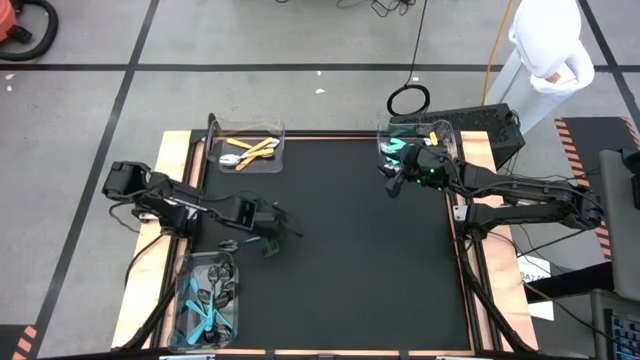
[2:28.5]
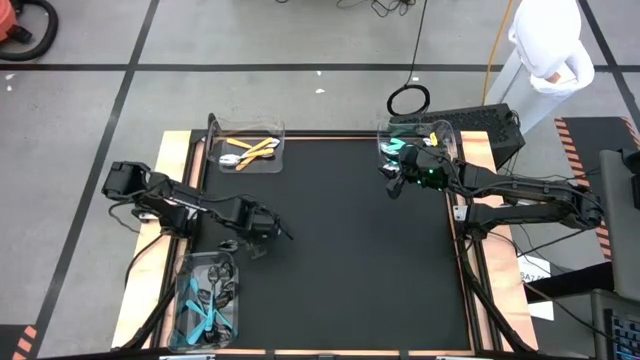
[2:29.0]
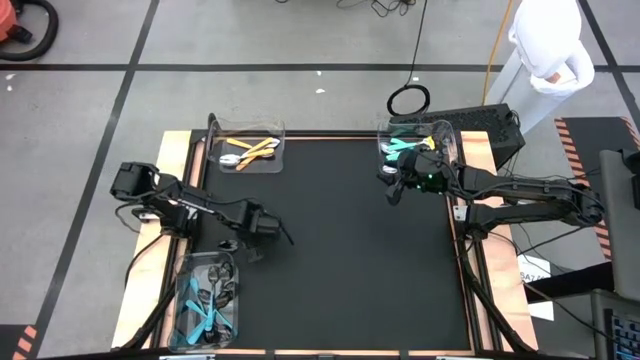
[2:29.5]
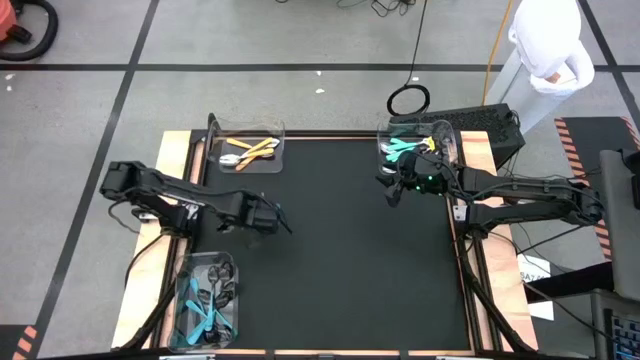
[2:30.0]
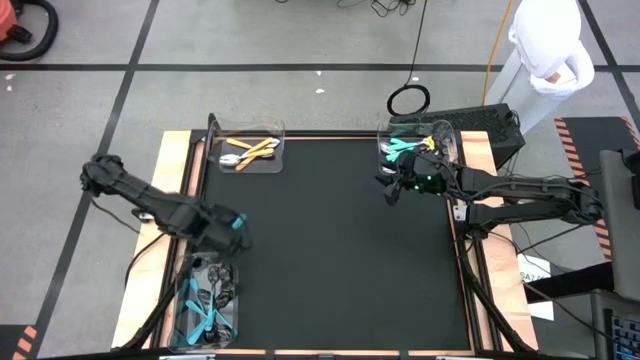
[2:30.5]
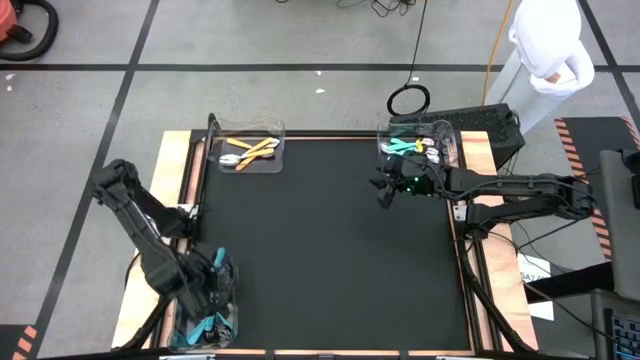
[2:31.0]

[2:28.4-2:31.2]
Task: Sort silverware by color (type)
Put the blue spoon into the bottom bin

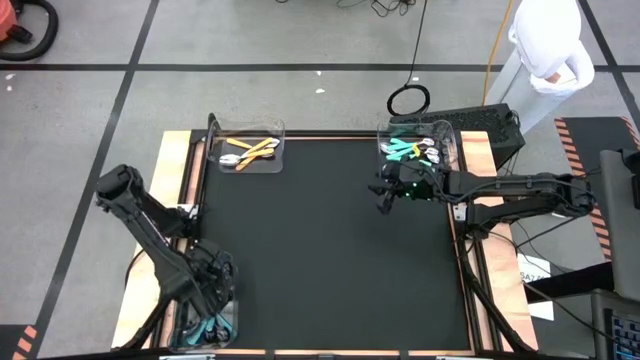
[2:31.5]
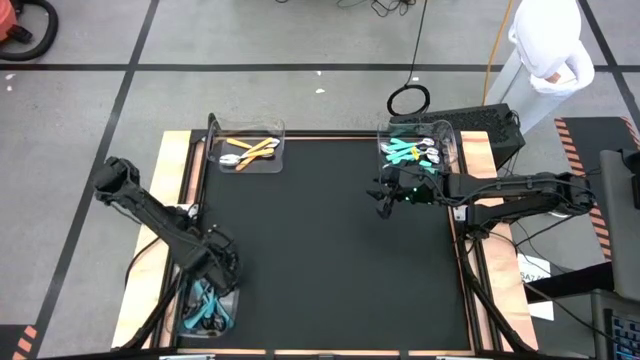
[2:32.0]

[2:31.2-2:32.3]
Adjust the bottom bin on the table

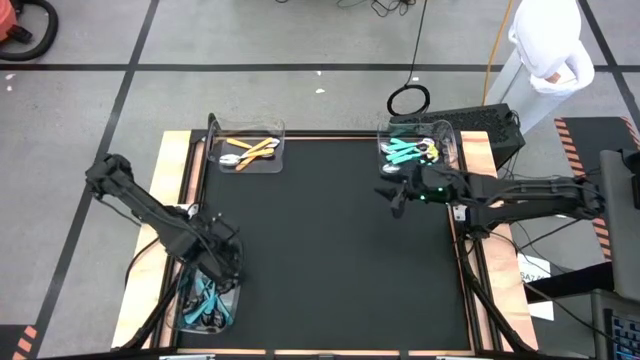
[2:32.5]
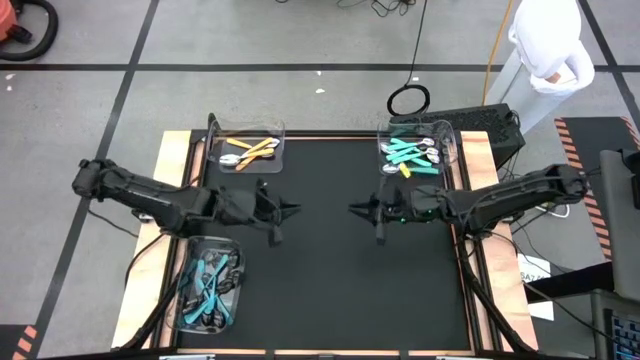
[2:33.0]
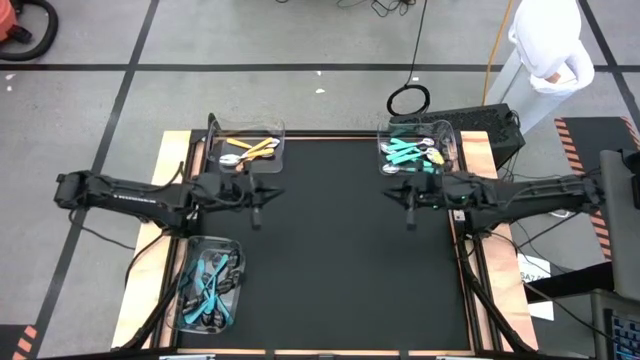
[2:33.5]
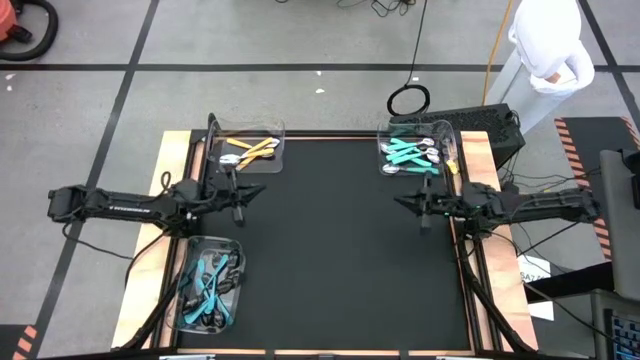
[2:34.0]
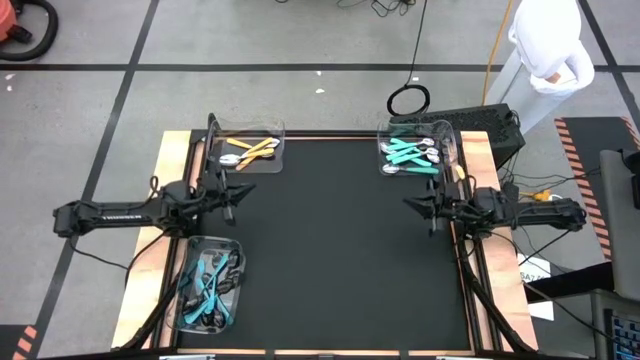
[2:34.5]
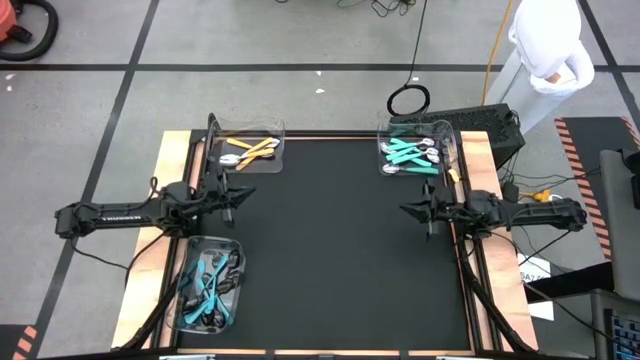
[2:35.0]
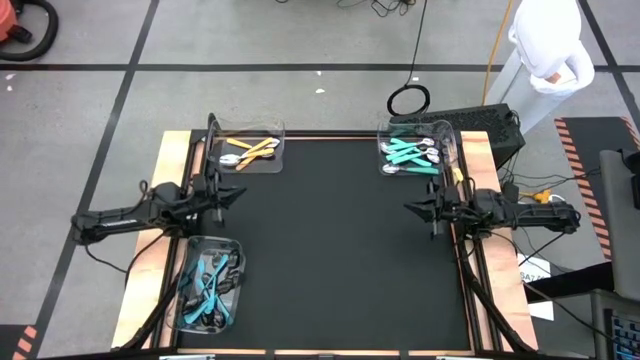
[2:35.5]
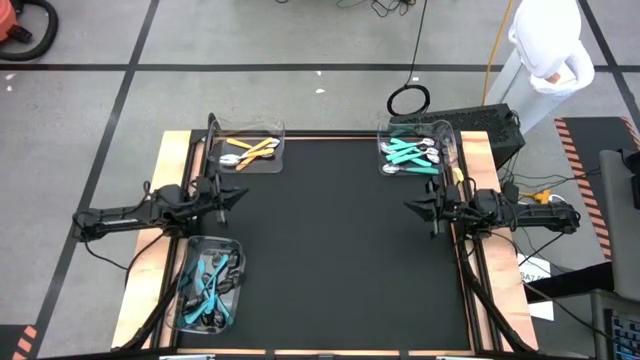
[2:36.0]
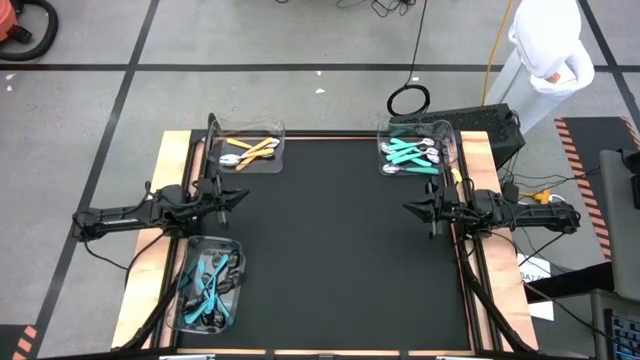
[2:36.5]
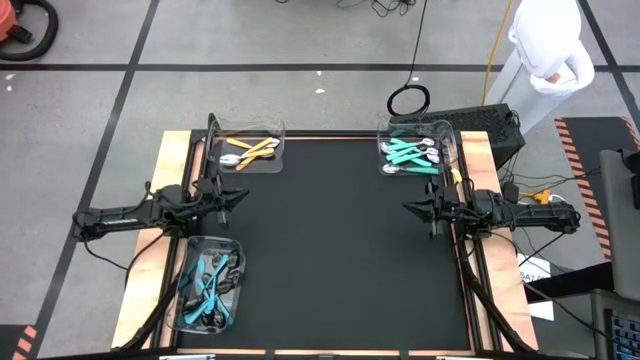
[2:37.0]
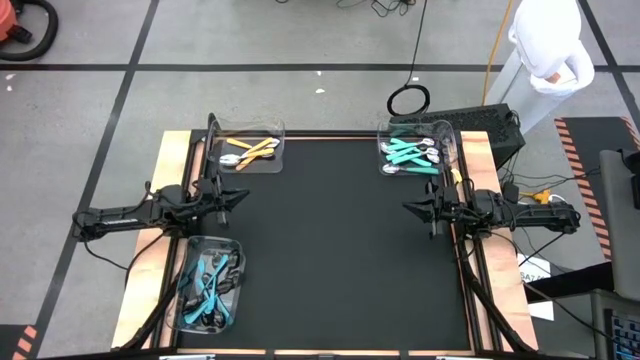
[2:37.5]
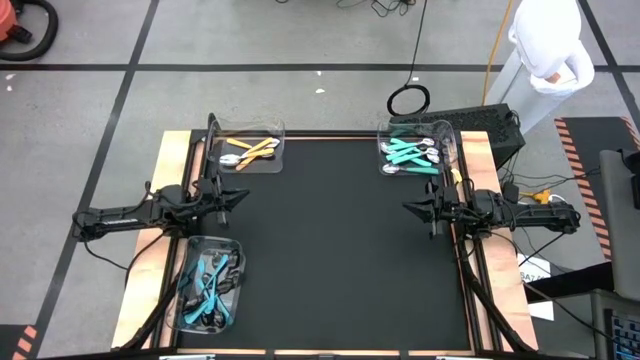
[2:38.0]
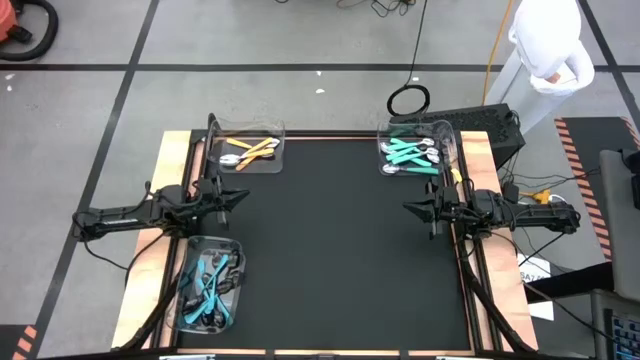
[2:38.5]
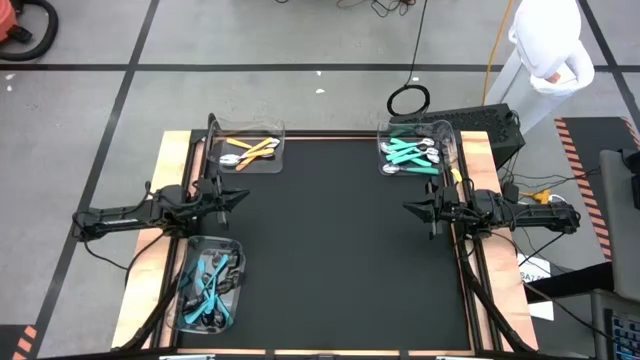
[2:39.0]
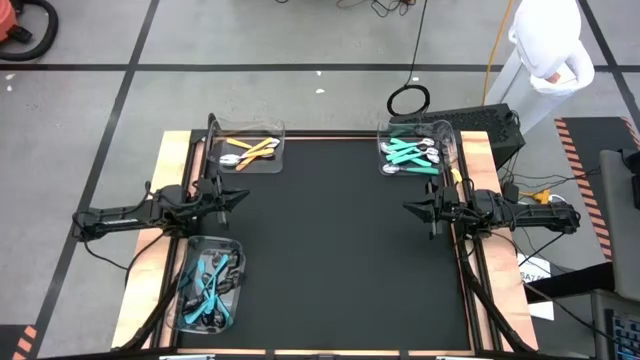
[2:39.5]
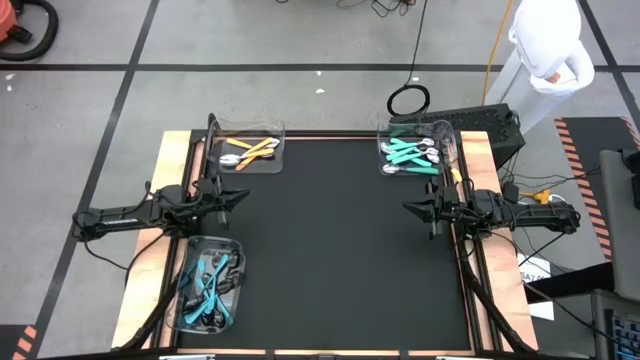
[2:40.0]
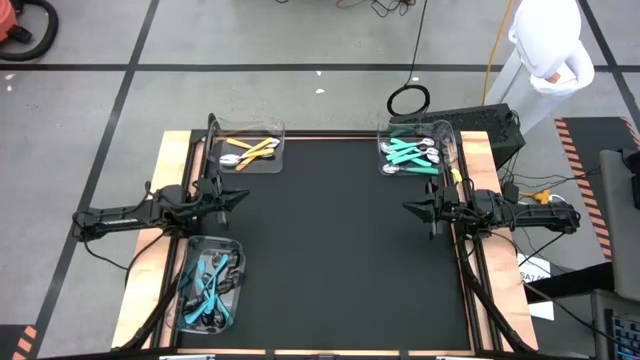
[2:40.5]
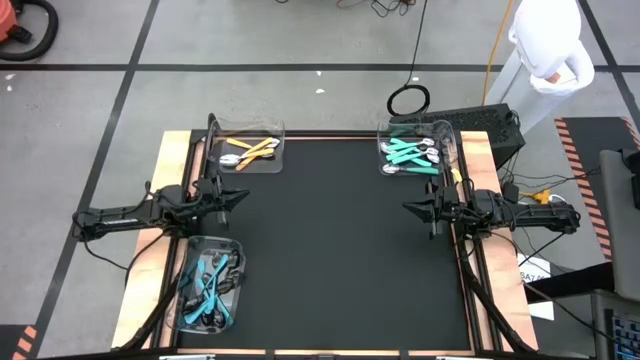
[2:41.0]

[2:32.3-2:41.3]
Return to Home Position

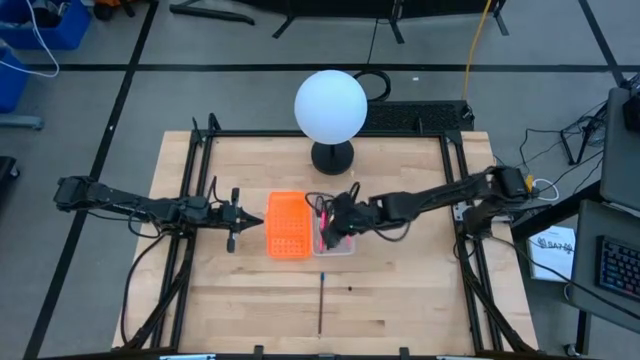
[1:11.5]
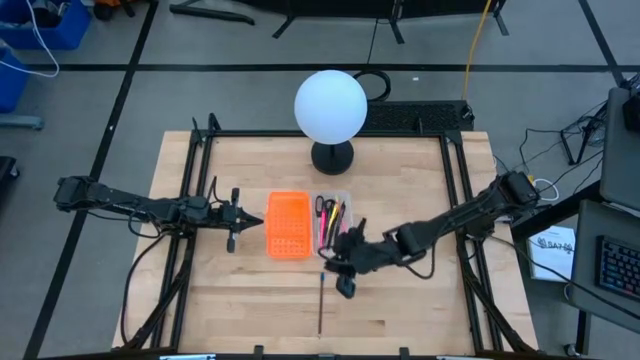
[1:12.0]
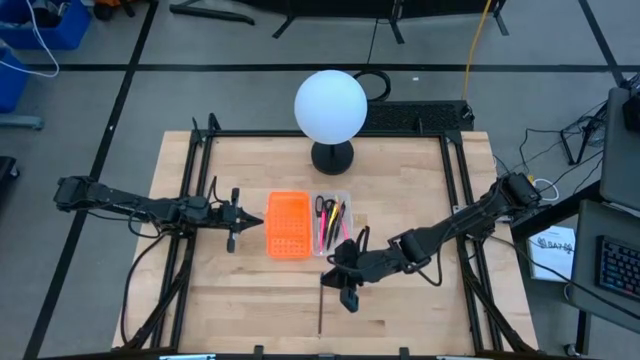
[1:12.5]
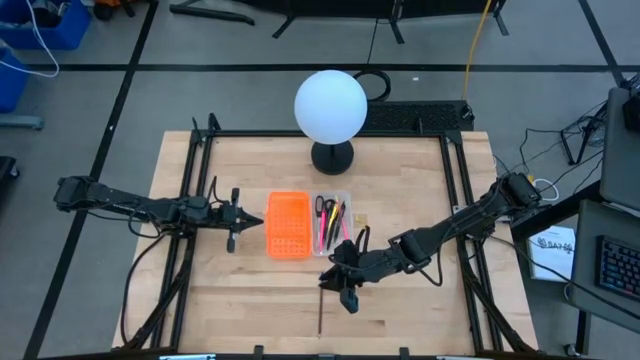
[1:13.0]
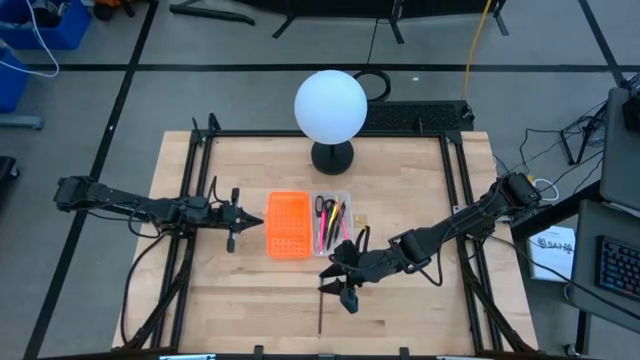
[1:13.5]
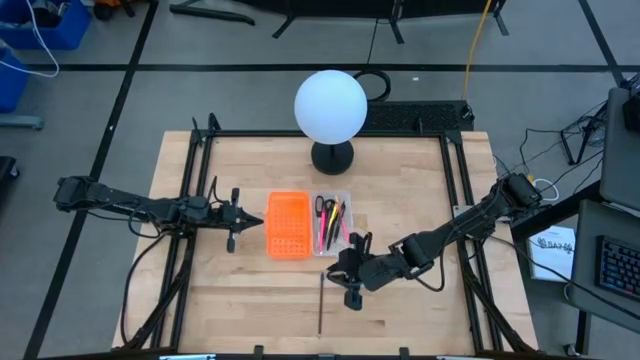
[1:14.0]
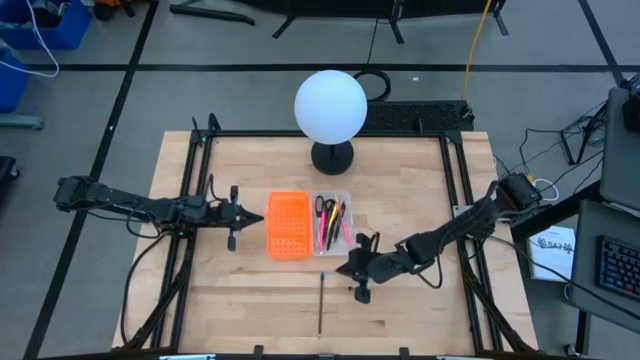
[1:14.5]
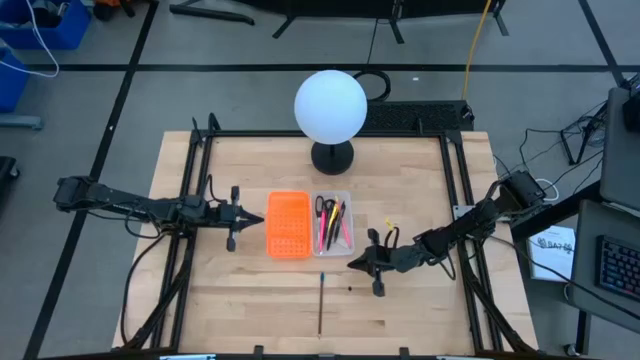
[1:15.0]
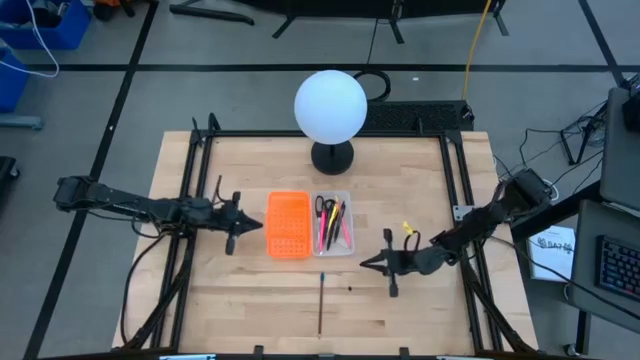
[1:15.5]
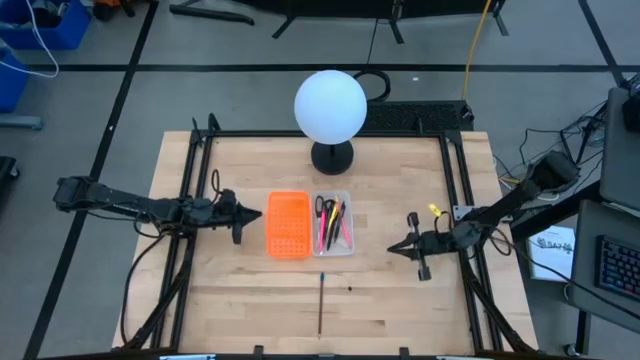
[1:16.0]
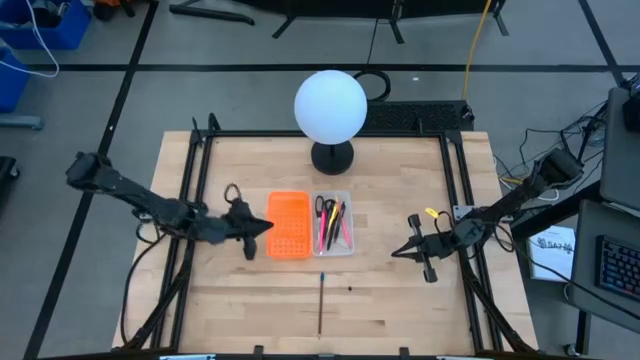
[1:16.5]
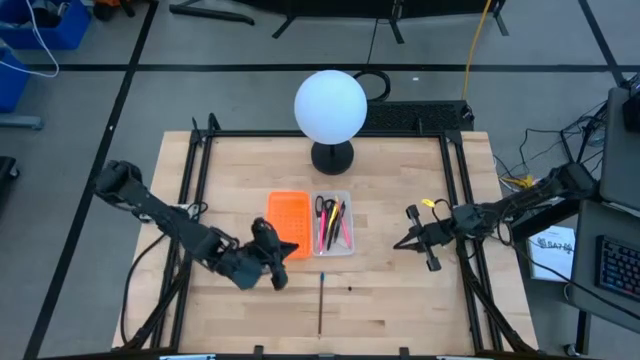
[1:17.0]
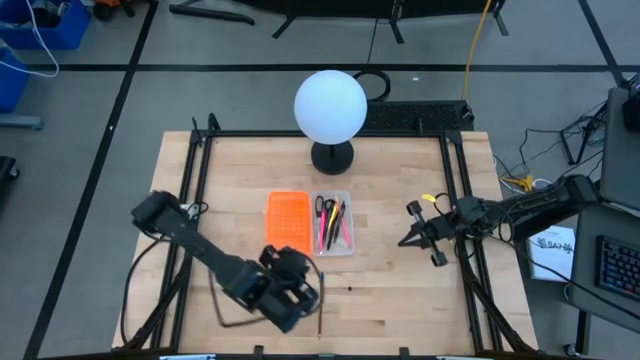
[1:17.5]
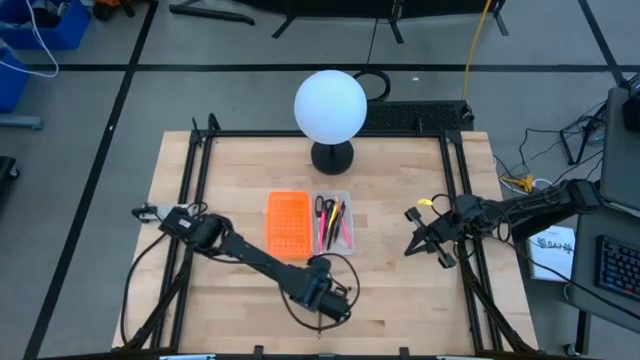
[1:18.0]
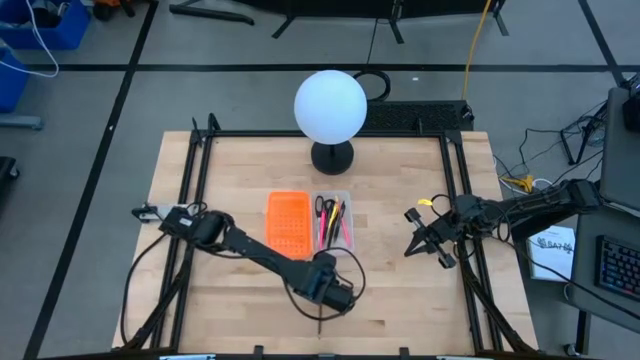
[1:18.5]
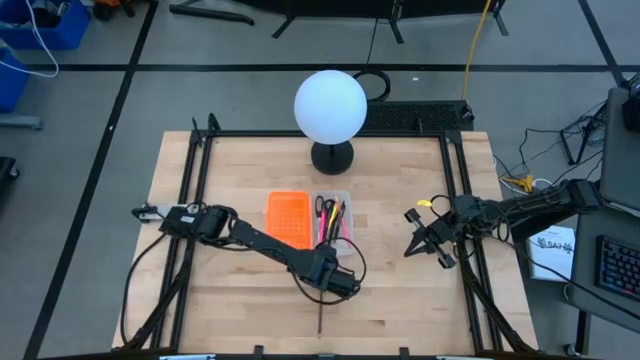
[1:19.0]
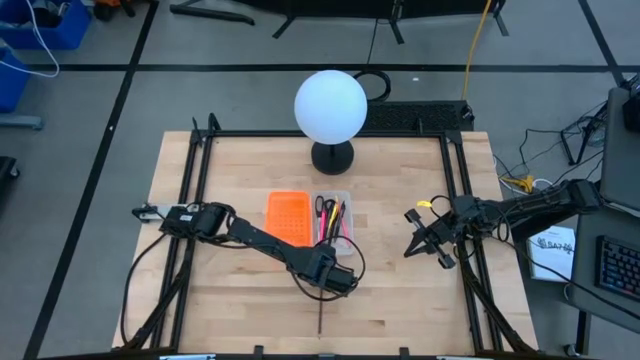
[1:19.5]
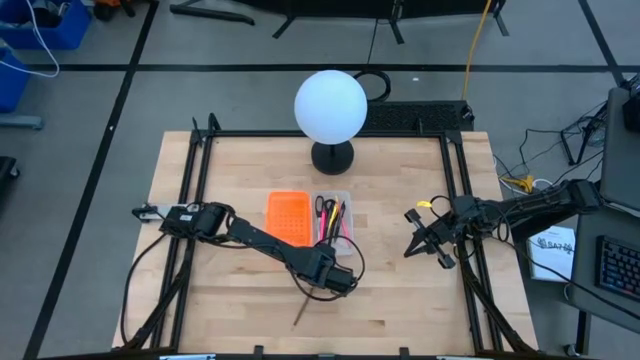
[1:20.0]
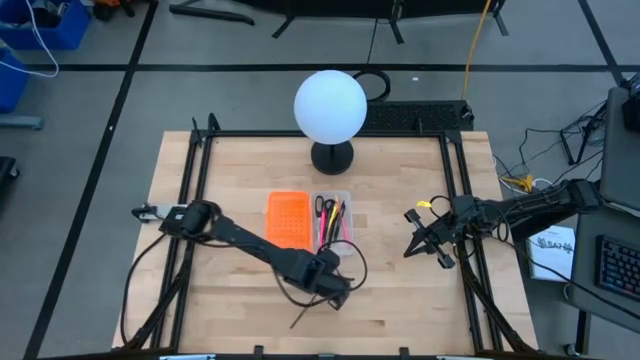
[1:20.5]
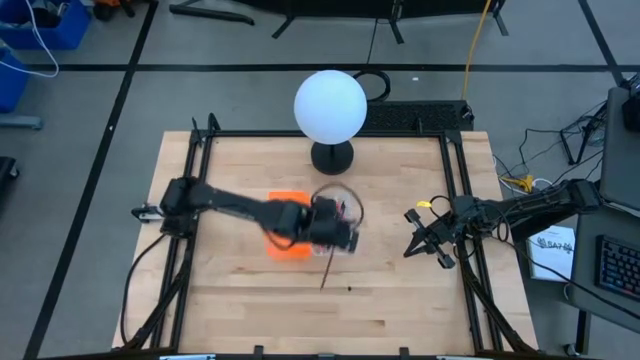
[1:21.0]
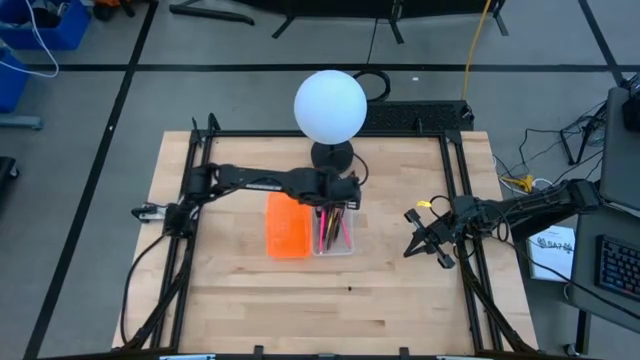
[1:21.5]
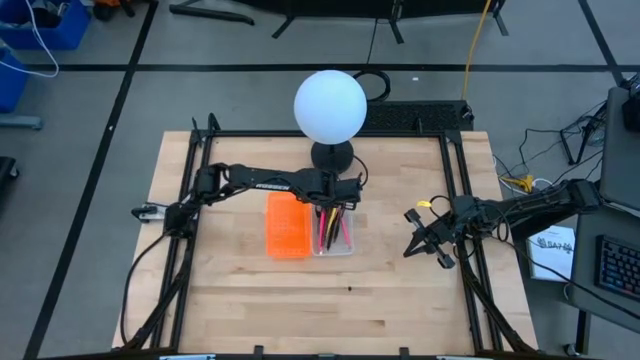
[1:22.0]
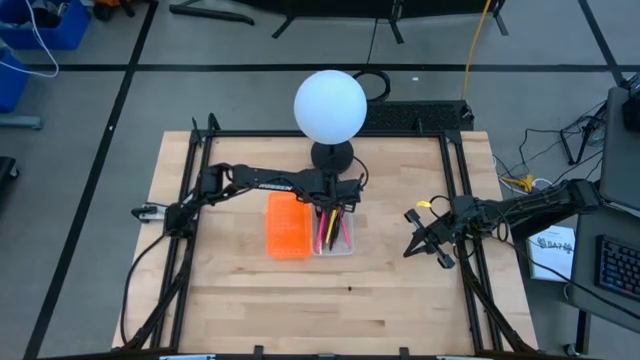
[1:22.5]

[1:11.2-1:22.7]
Task: Pick & place school supplies into a supply box
Put the brown pencil into the supply box
